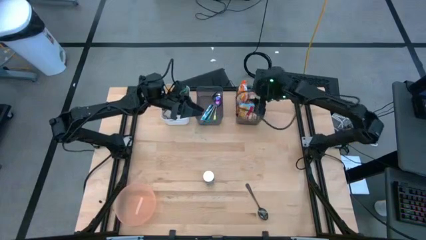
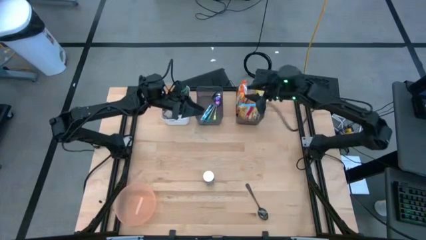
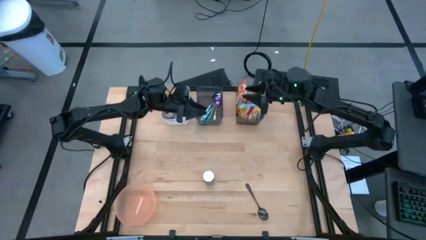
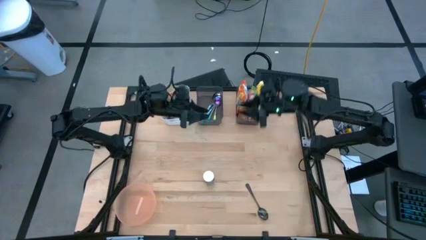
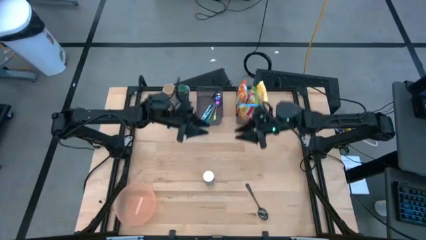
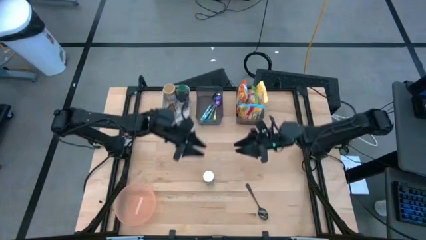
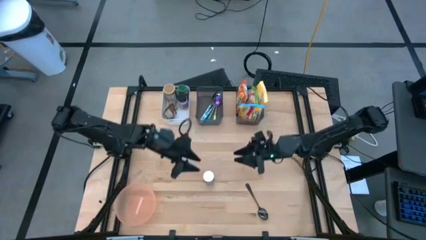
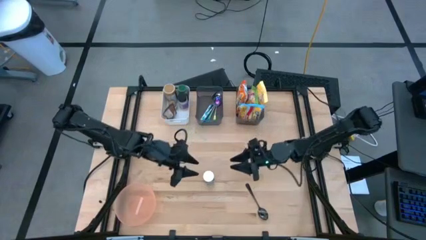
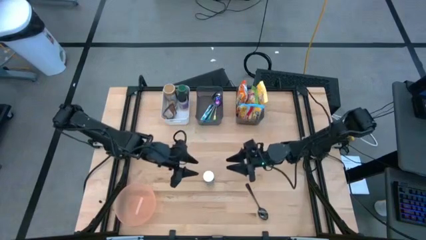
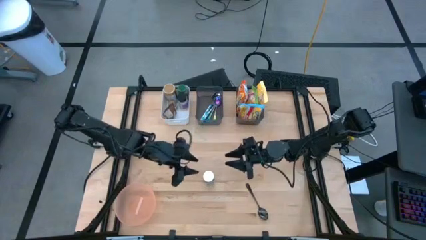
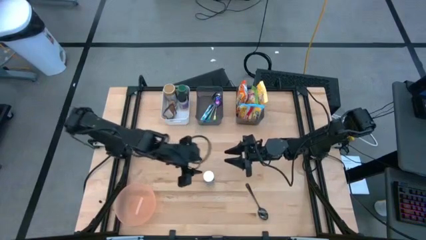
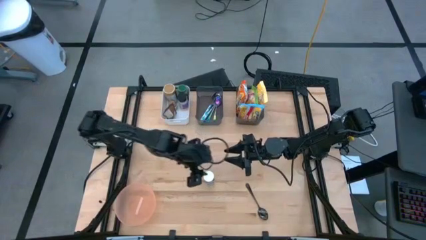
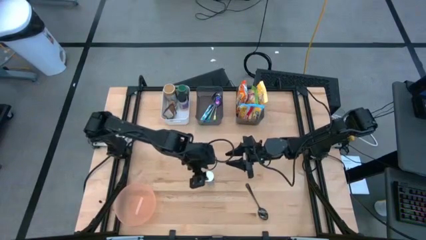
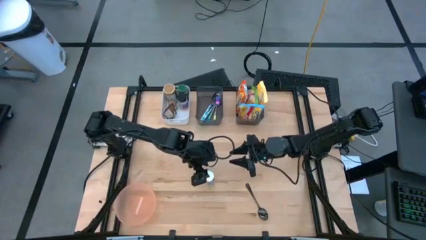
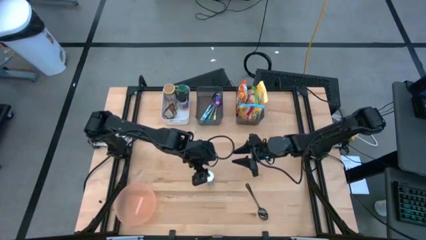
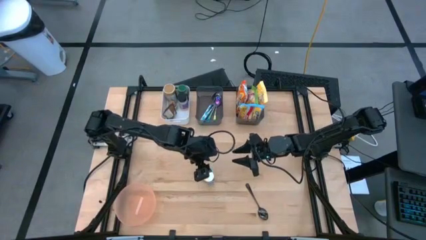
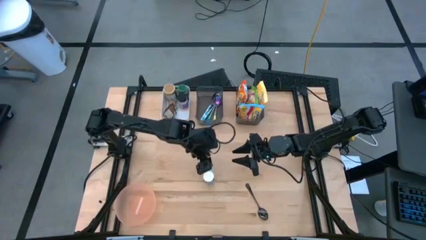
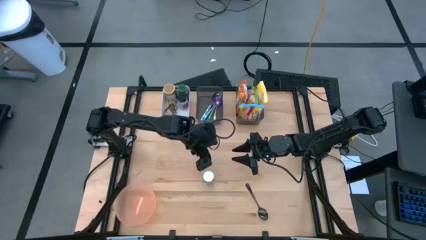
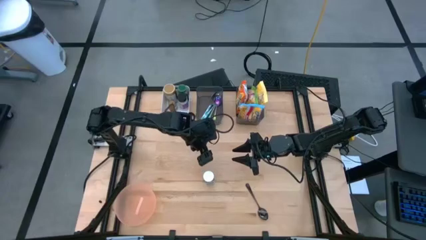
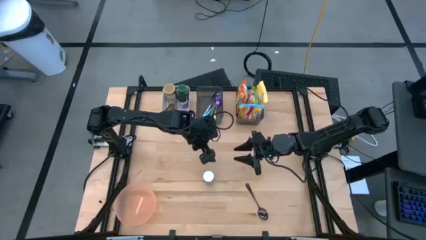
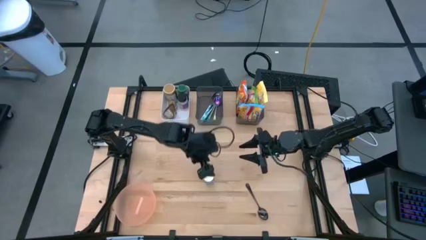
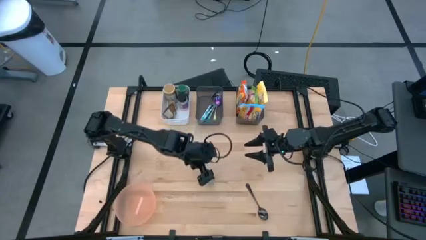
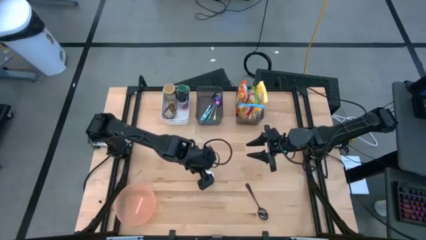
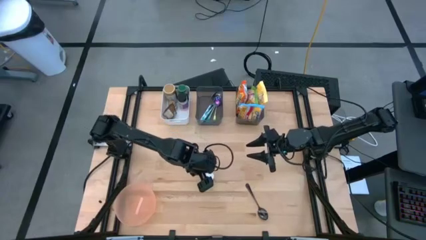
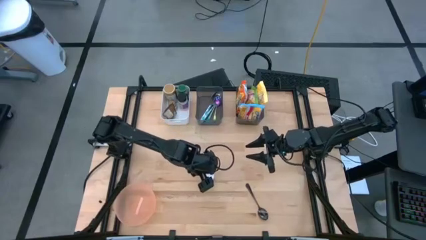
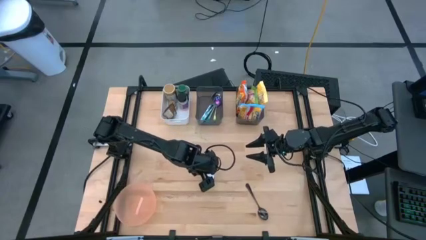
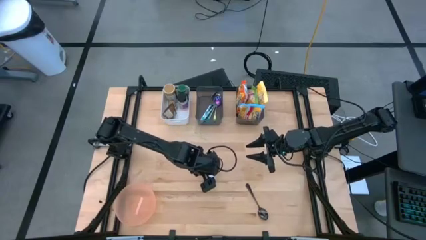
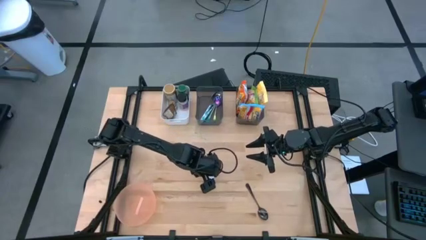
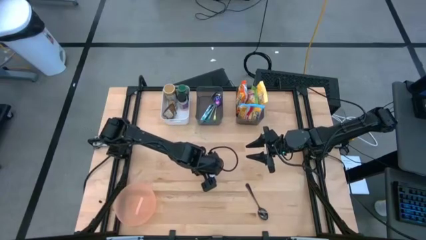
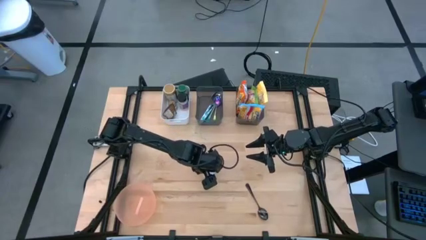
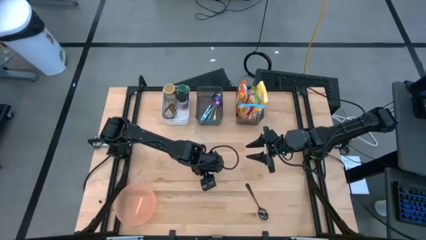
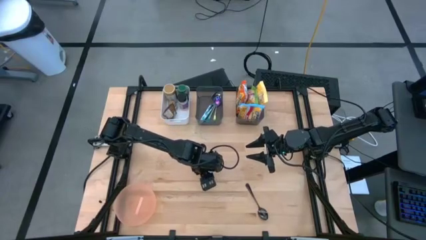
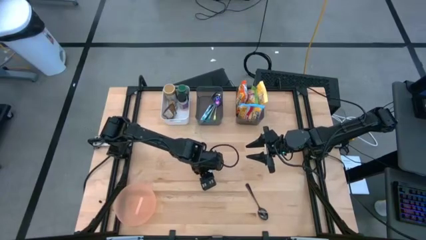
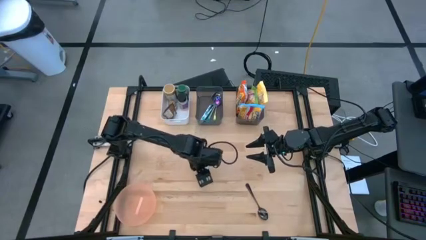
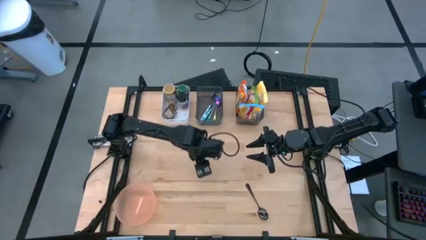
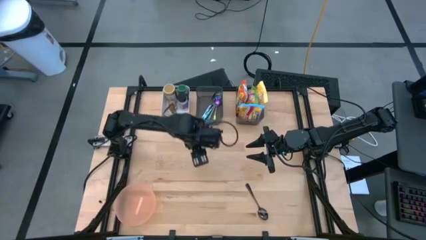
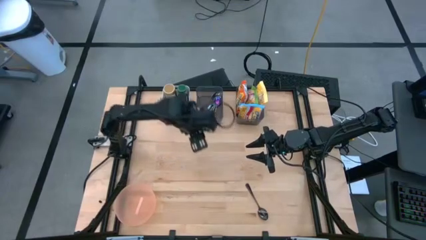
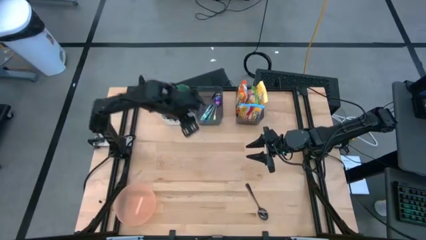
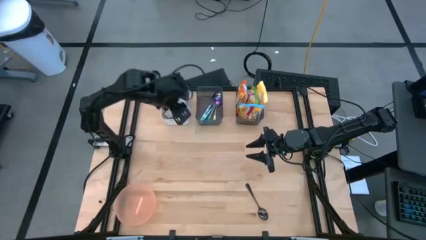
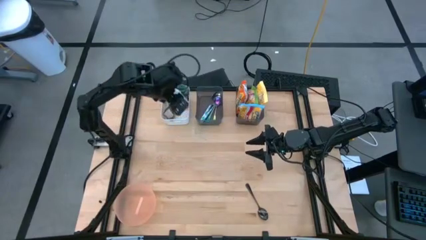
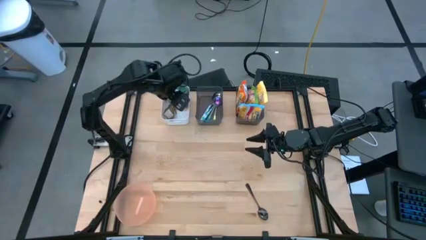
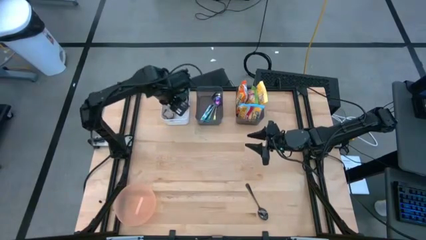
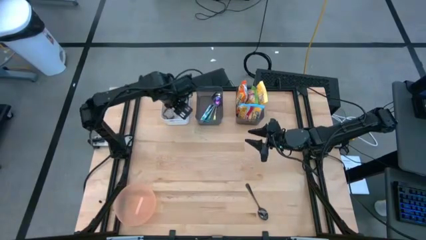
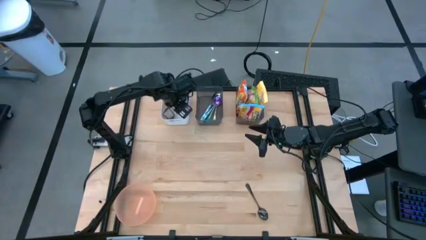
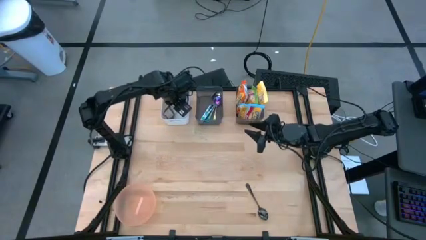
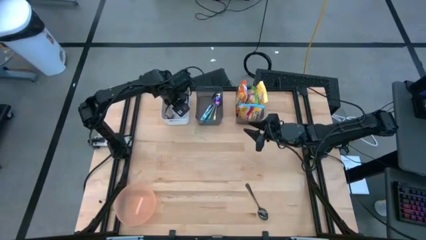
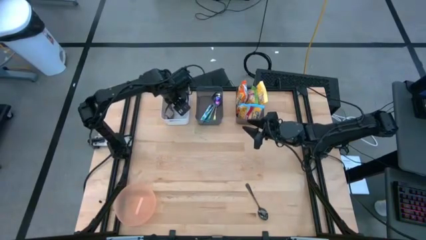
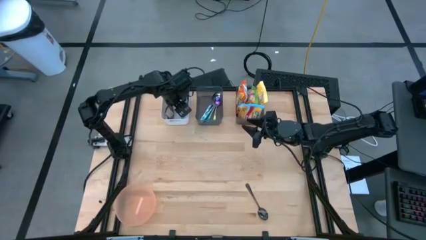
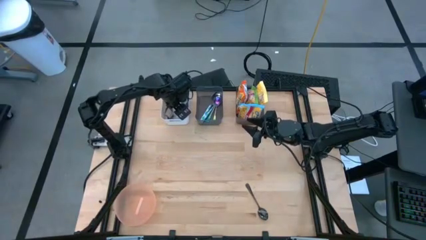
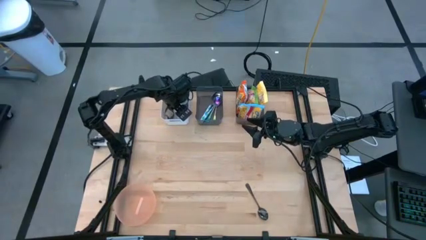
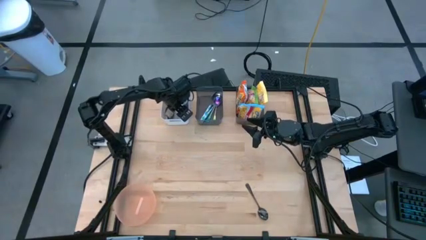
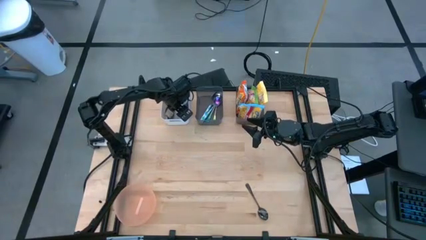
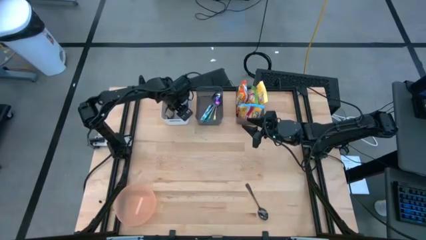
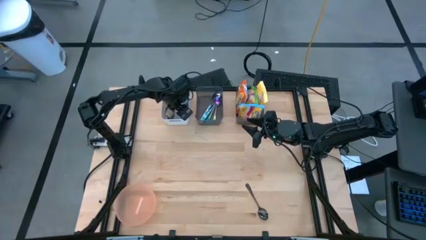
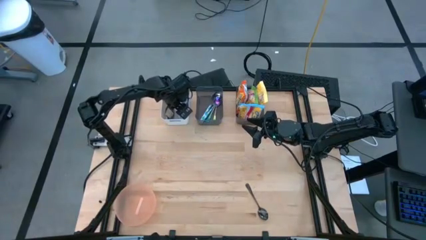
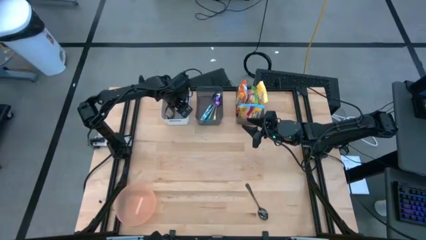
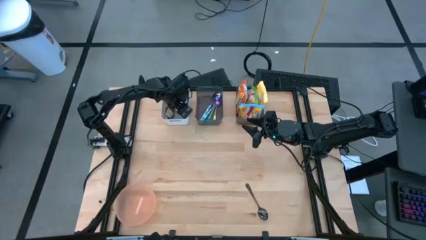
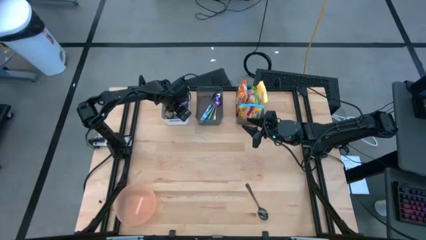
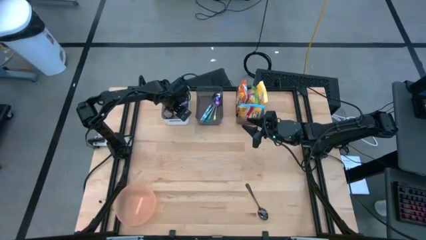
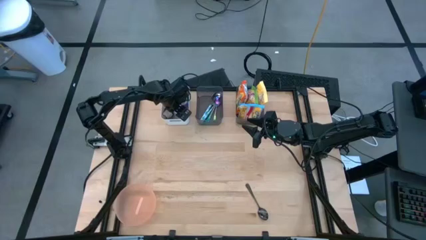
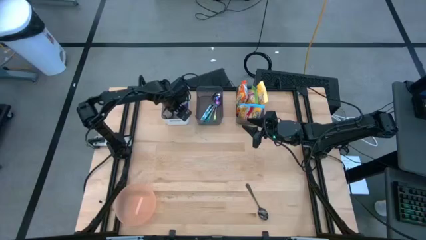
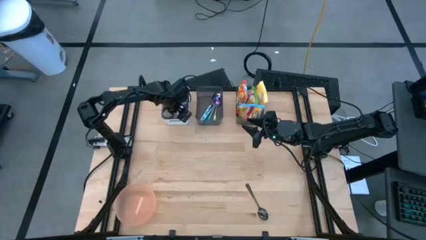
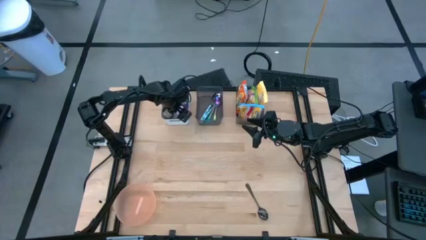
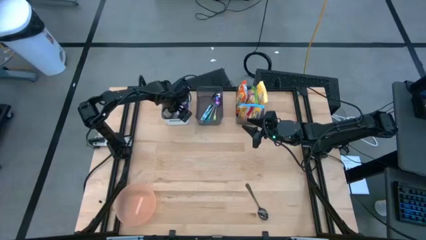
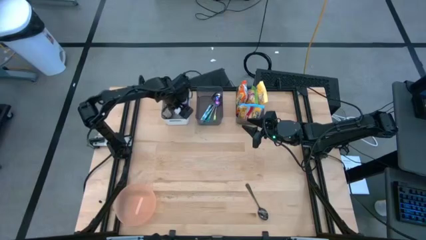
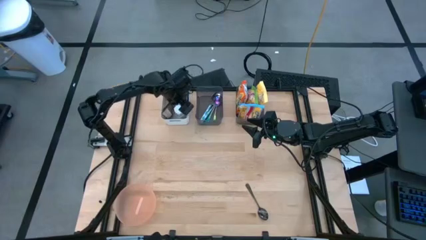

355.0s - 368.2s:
Task: Pick & Place Food Item
Put the white seasoning bottle into the white bin

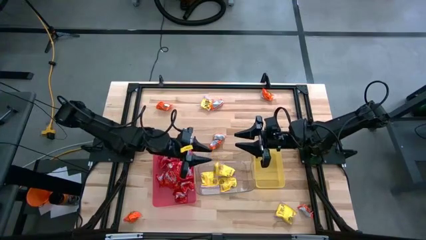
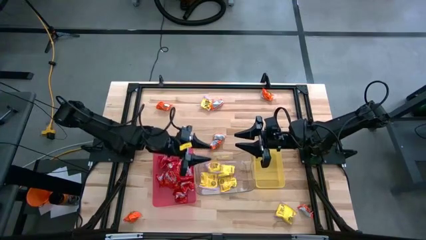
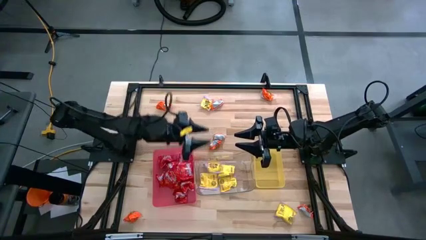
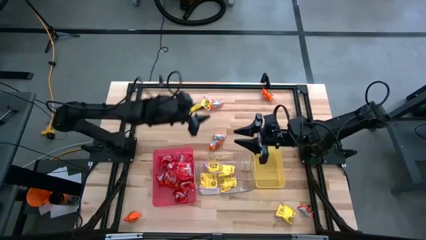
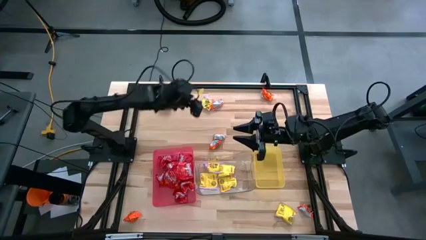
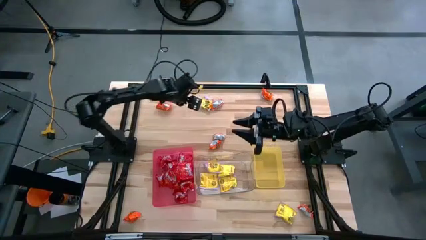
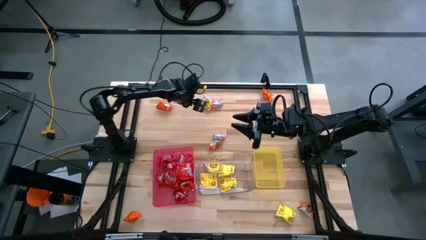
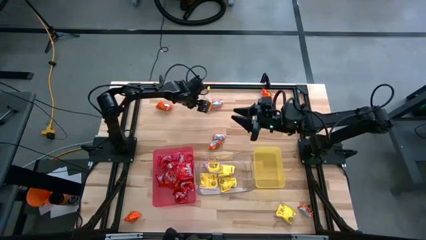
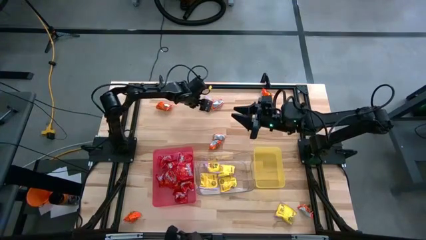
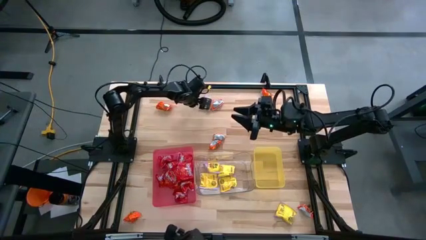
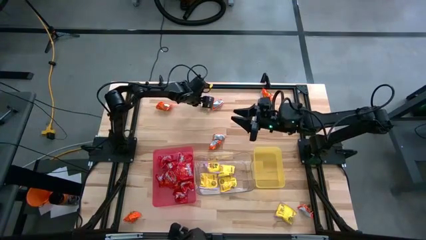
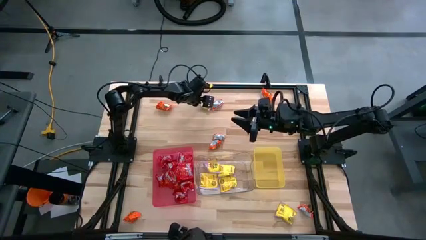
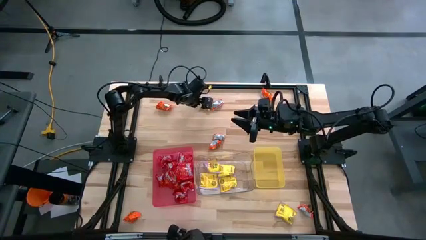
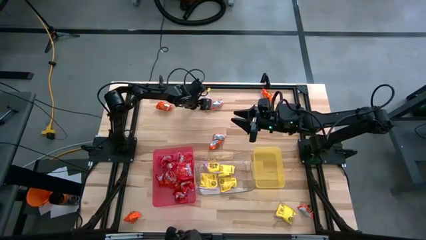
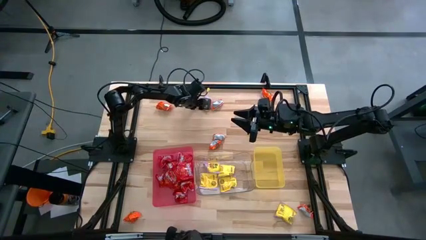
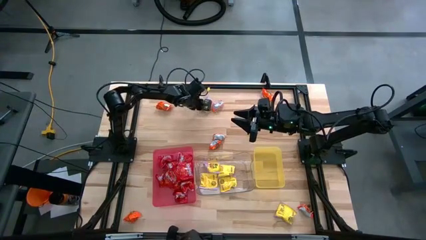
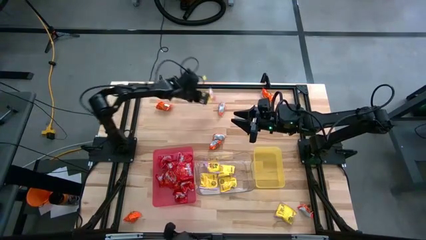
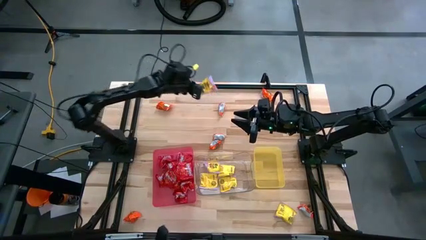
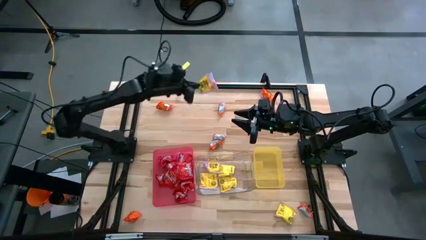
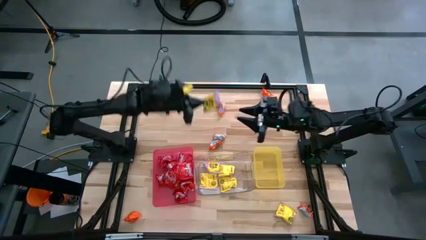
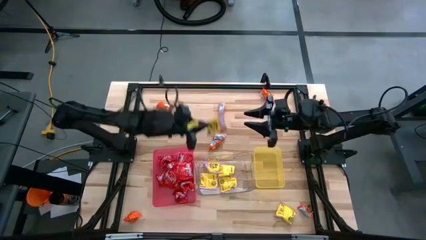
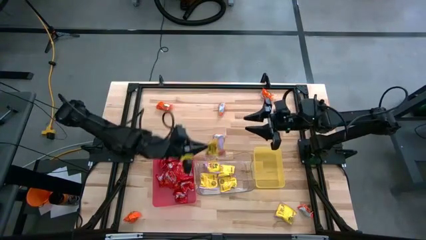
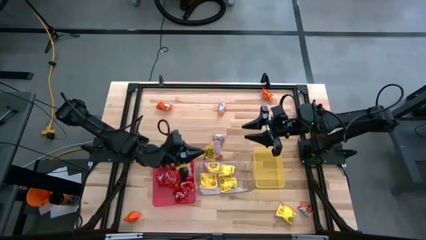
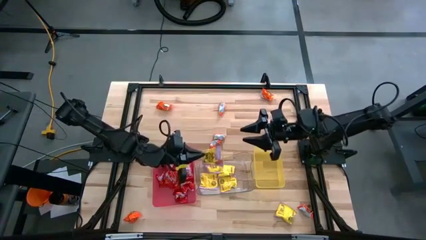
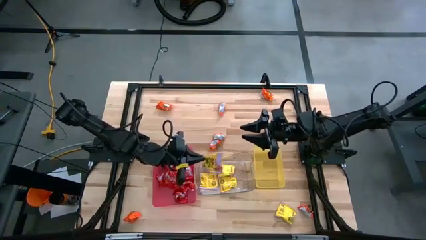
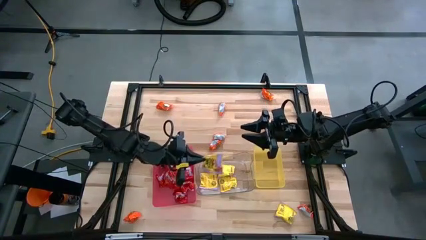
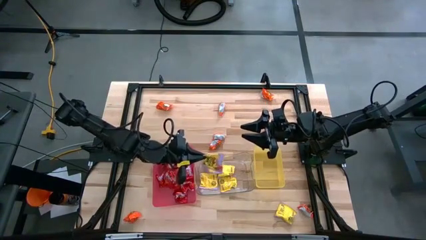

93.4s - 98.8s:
Task: Sort candy
Put the yellow candy into the transparent bin
